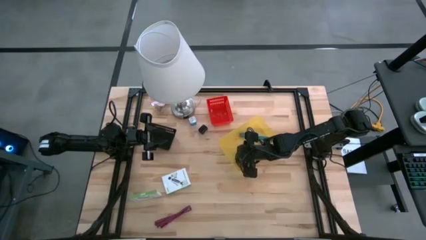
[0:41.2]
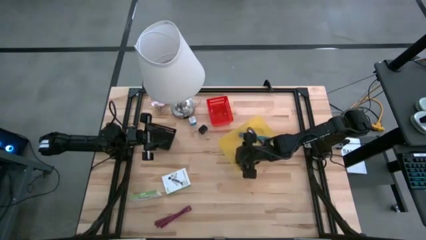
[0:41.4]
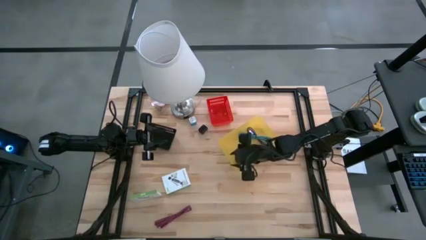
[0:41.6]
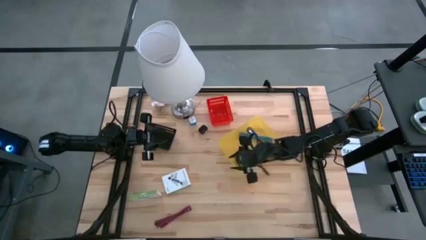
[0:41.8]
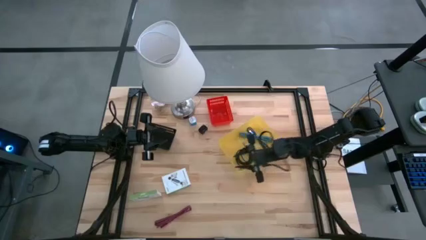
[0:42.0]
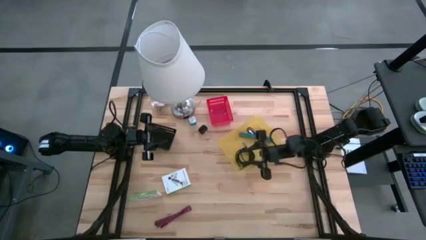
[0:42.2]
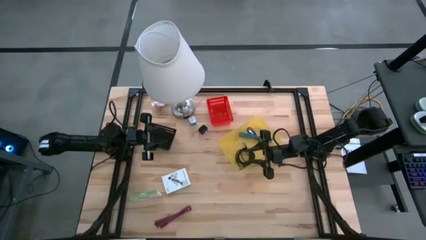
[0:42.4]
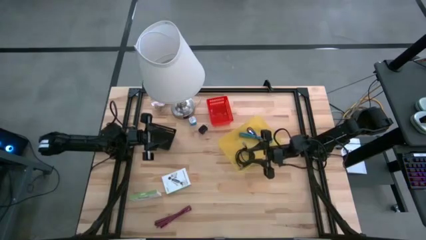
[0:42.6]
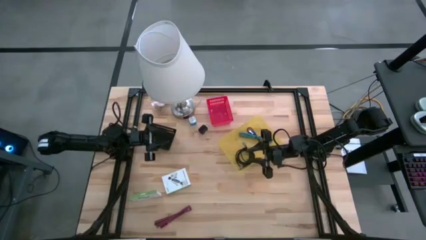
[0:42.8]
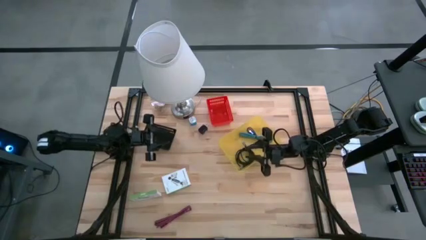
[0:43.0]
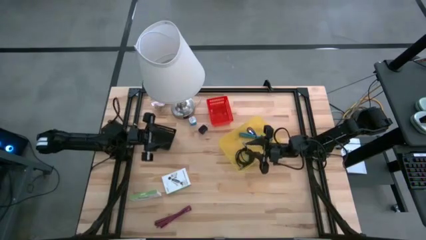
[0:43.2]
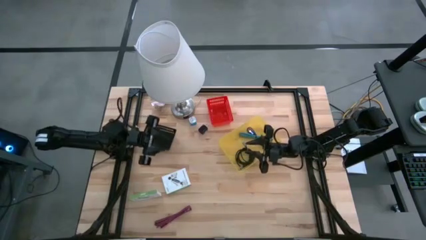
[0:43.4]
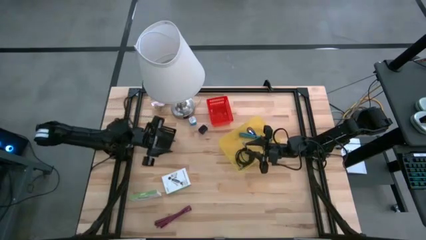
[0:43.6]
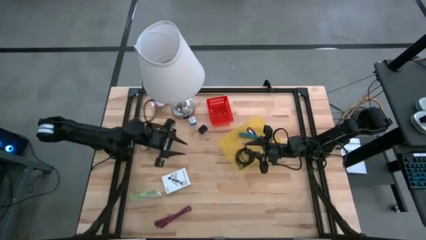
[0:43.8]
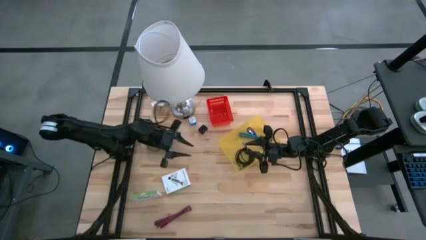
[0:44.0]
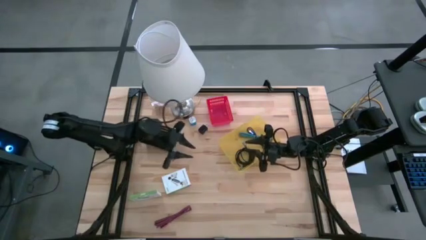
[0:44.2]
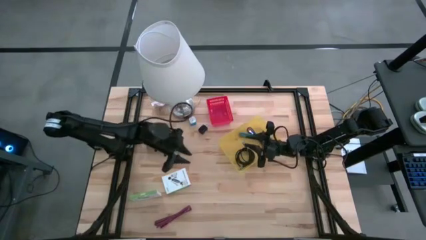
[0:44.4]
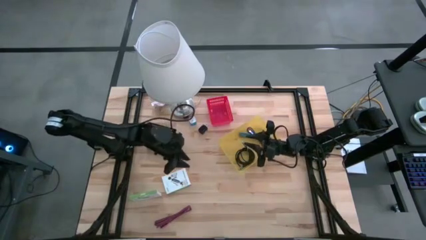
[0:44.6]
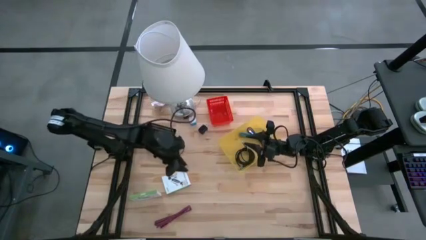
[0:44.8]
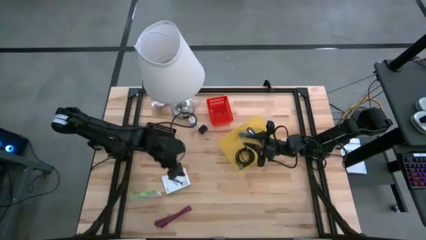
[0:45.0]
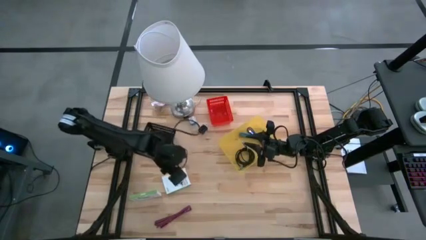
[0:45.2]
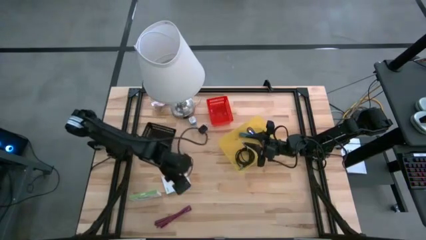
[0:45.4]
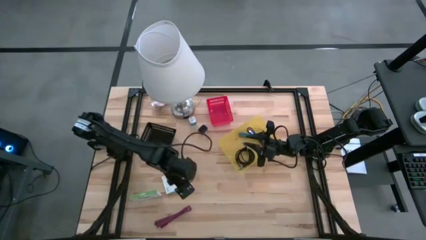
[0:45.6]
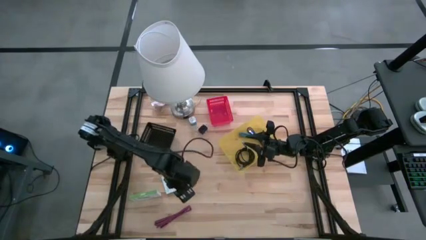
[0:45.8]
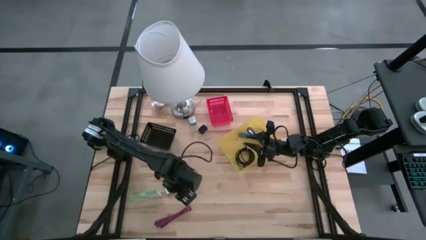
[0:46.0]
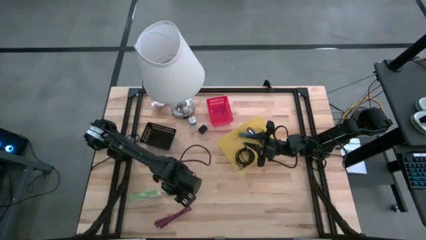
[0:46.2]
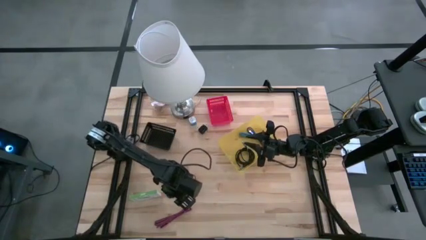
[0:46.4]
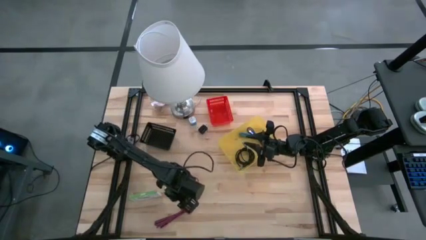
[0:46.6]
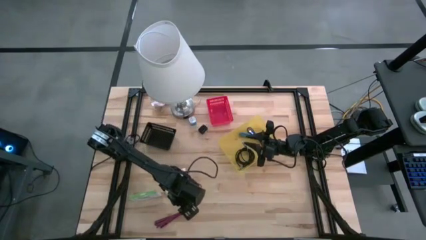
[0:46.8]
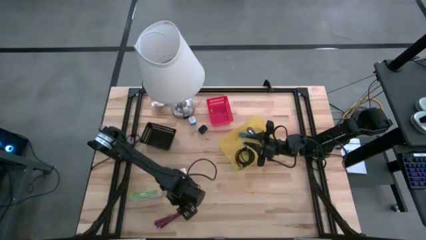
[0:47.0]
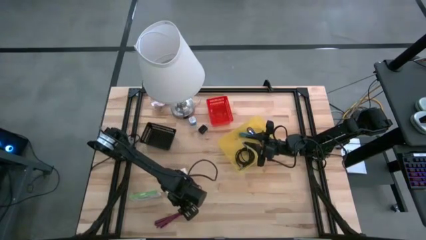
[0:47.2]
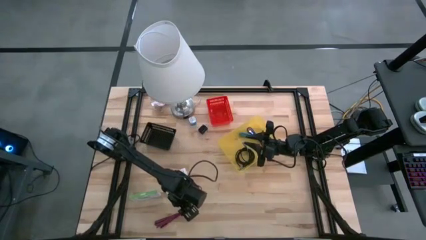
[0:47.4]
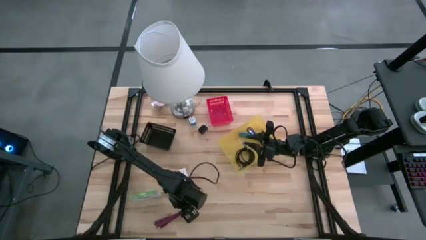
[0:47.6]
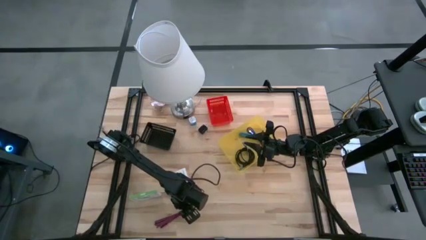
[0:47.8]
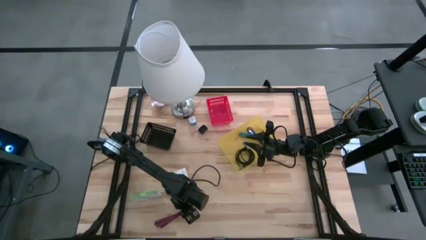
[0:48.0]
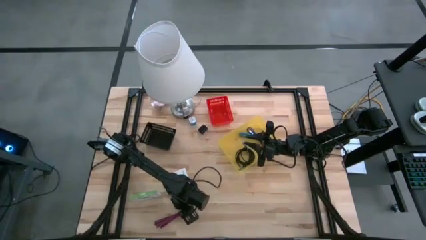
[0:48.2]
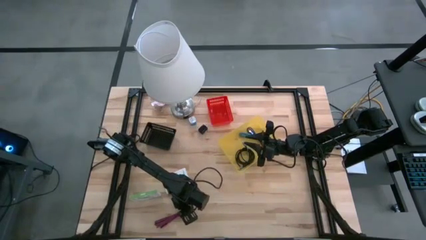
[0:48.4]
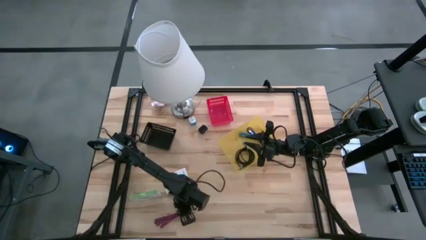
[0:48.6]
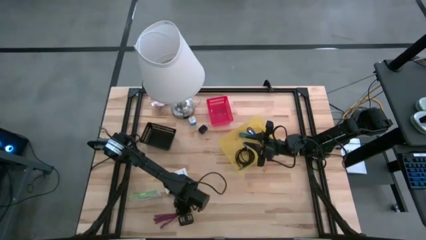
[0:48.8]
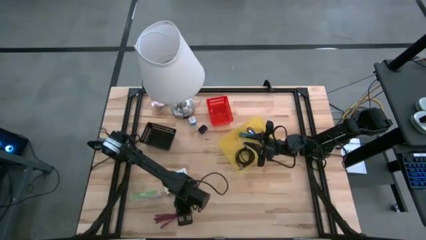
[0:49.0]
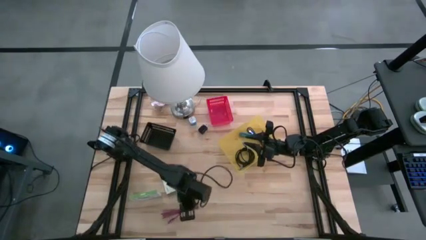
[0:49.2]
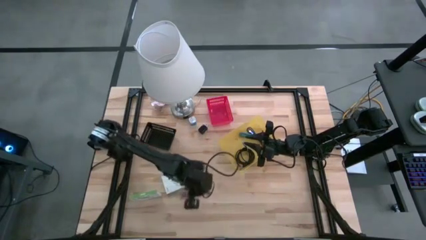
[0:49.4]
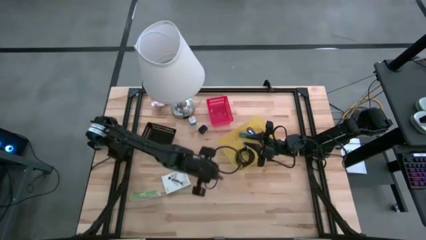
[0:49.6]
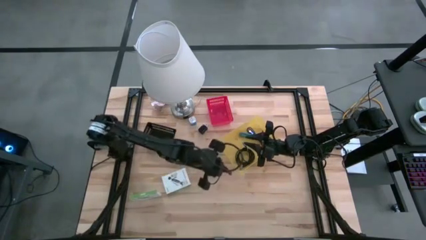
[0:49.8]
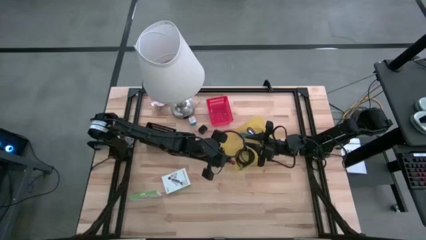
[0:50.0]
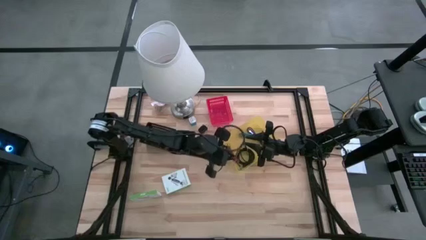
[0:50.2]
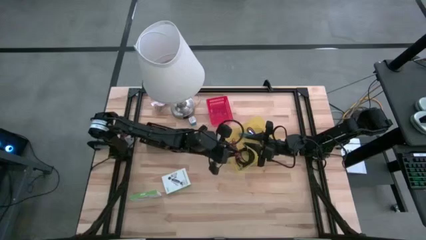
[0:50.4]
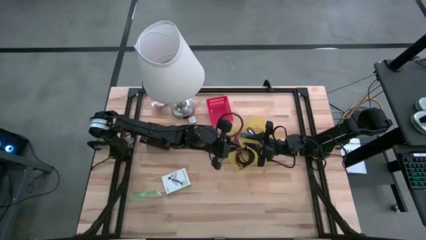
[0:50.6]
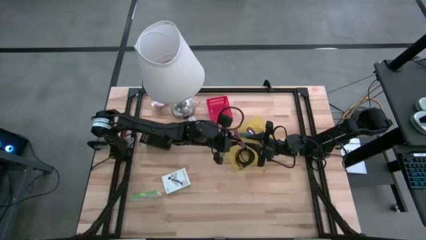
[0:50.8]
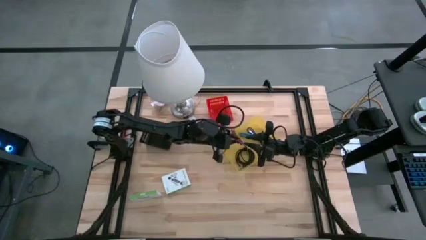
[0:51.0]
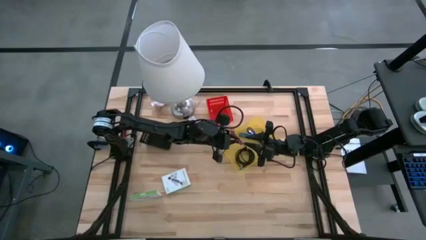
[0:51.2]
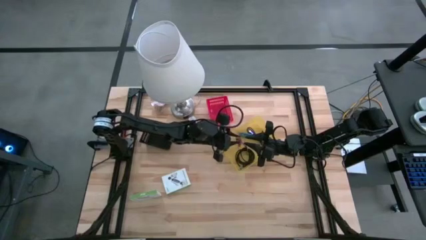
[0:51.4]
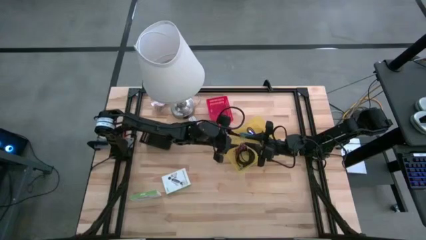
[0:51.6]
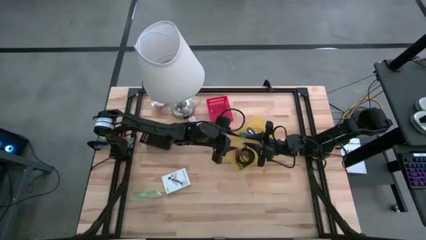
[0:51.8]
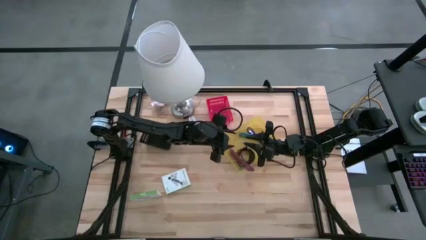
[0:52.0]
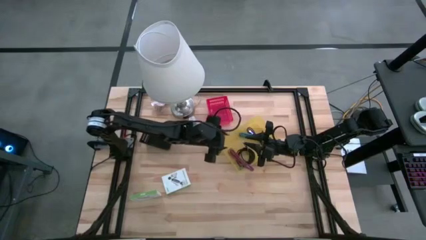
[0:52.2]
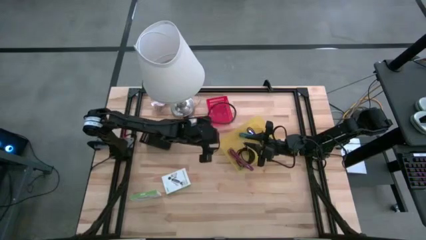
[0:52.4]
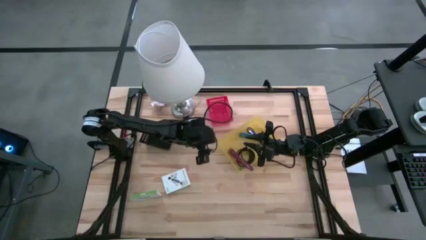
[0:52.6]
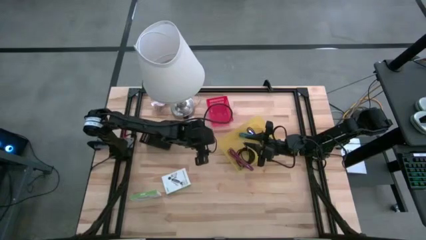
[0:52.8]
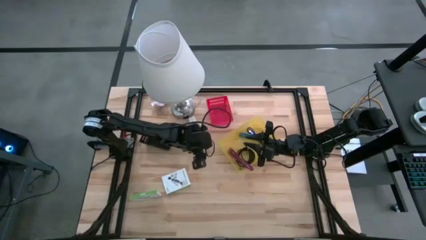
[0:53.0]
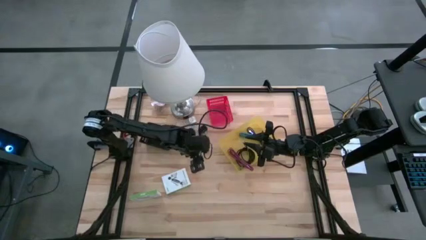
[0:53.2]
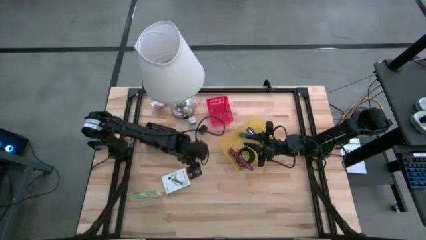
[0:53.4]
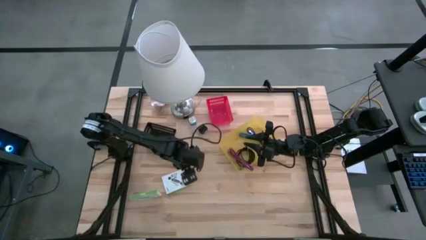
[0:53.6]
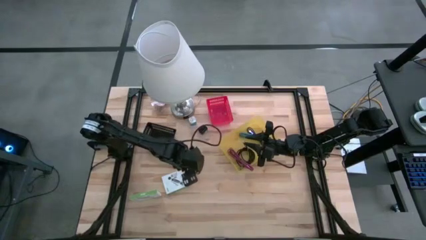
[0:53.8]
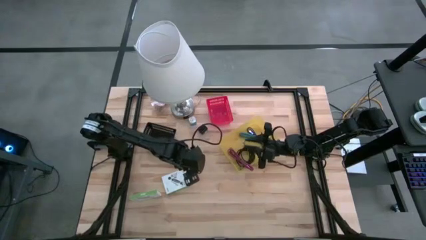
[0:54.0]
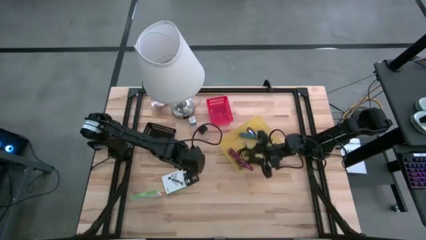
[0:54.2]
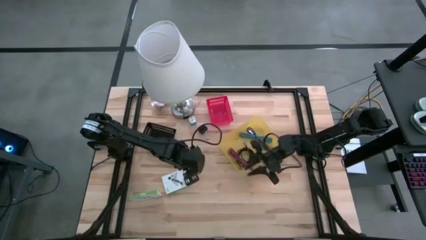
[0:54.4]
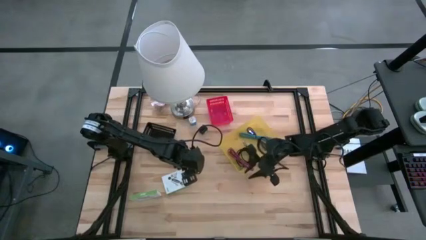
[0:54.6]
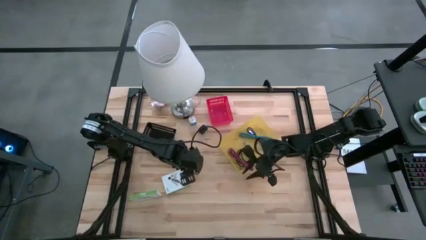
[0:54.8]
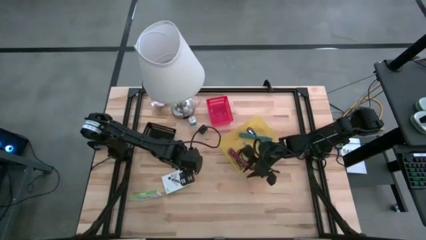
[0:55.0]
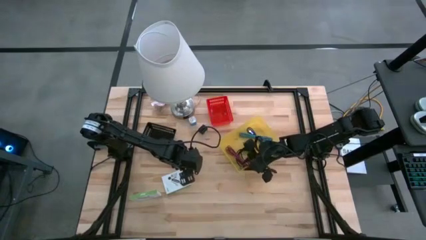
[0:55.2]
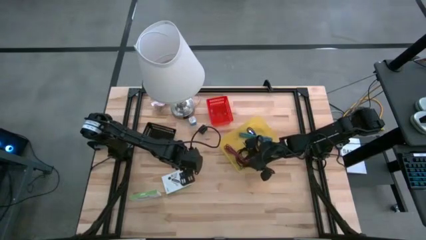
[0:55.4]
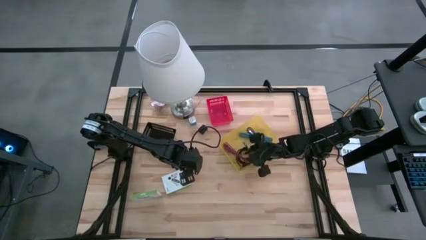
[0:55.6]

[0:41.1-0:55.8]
Task: Pick and place items into bin
Put the red charger cable into the yellow bin
